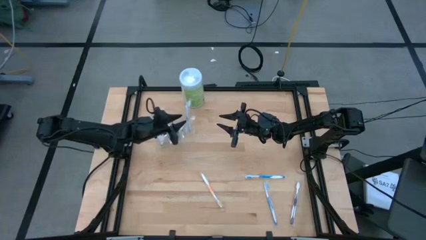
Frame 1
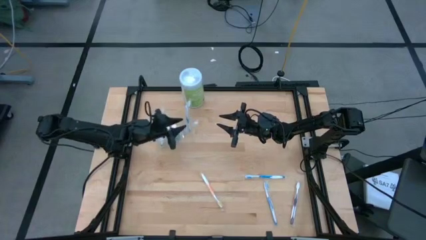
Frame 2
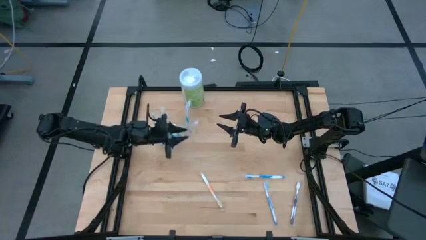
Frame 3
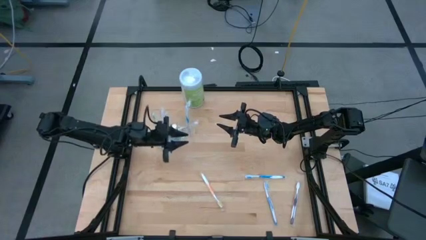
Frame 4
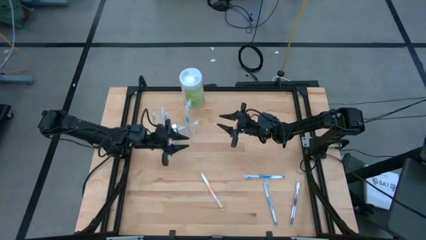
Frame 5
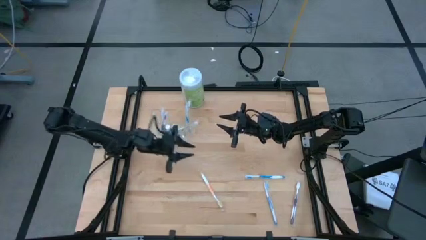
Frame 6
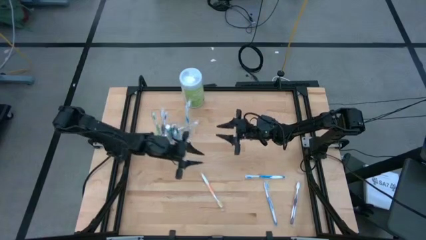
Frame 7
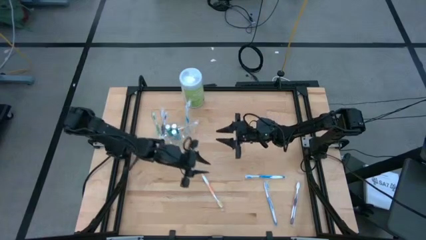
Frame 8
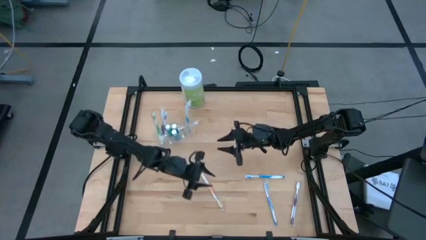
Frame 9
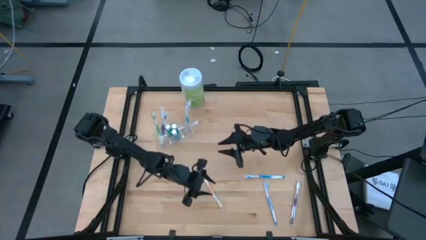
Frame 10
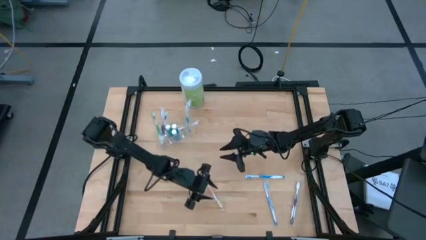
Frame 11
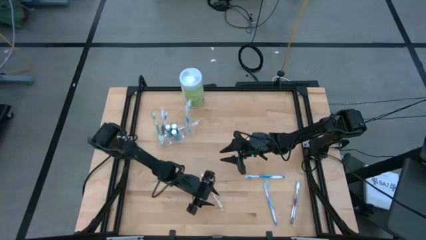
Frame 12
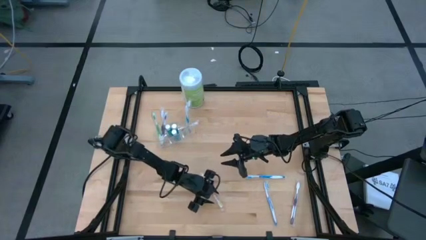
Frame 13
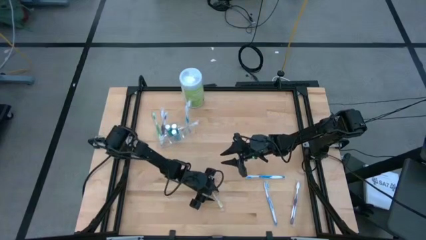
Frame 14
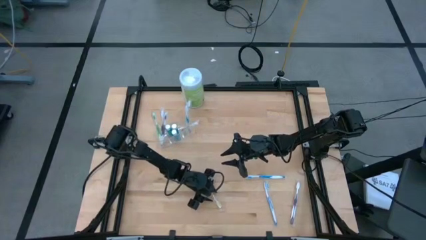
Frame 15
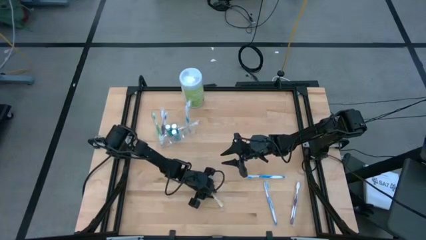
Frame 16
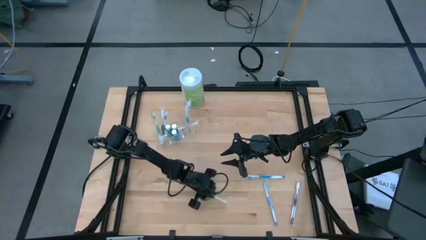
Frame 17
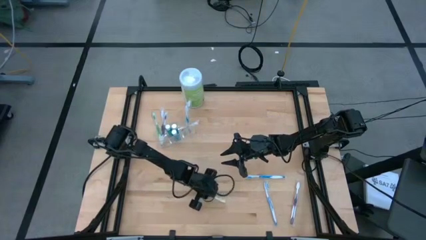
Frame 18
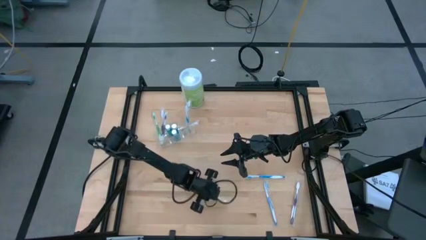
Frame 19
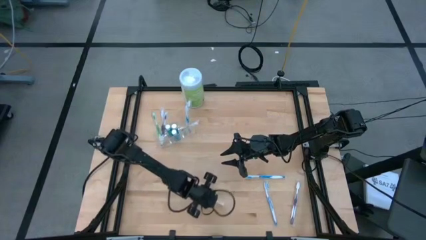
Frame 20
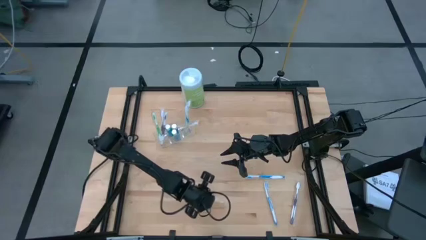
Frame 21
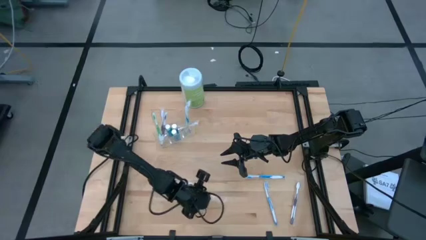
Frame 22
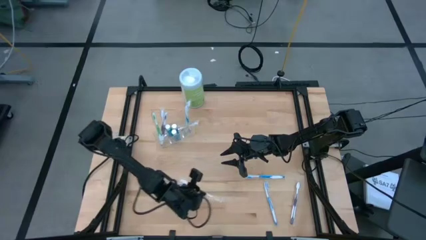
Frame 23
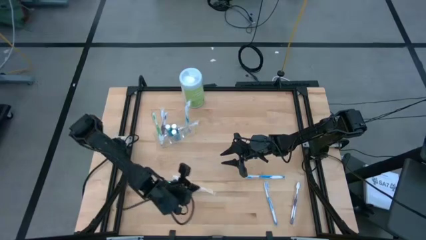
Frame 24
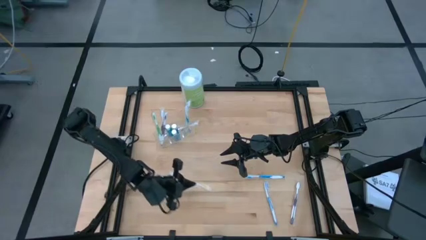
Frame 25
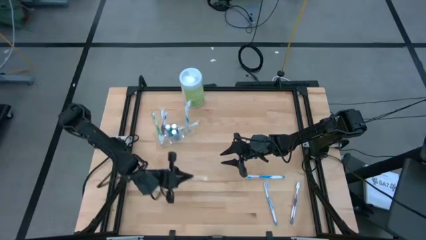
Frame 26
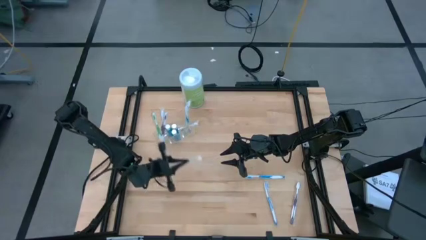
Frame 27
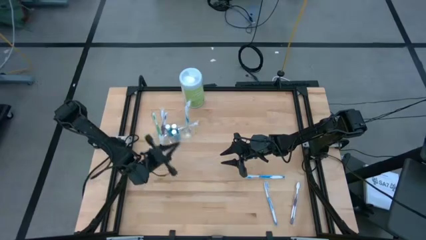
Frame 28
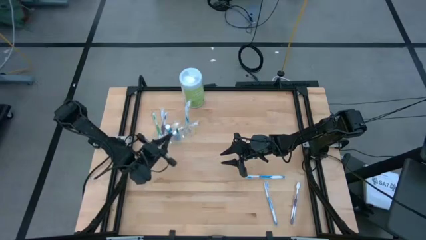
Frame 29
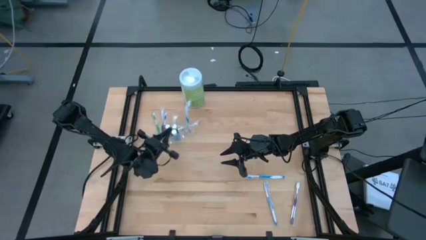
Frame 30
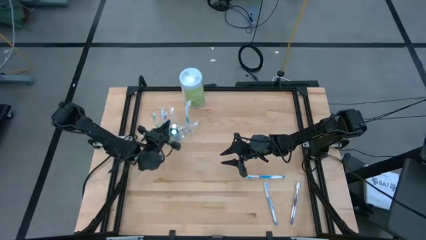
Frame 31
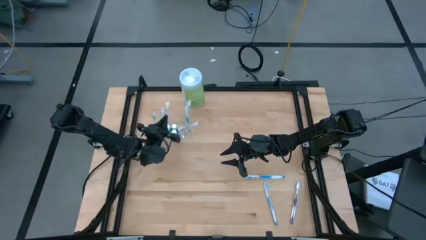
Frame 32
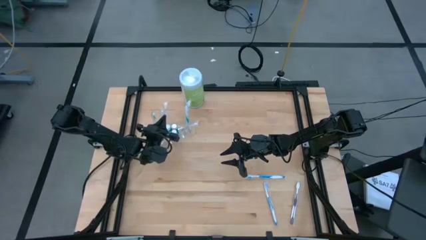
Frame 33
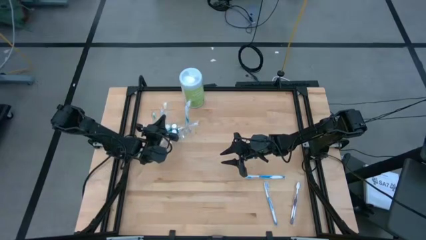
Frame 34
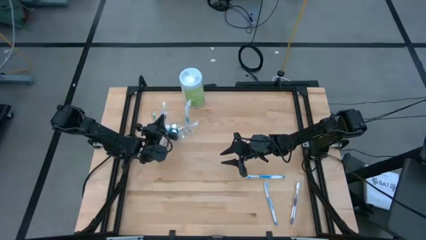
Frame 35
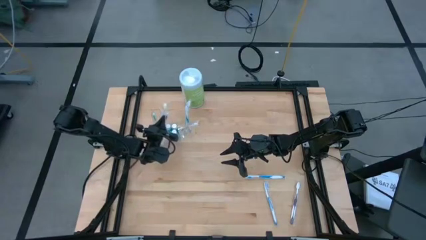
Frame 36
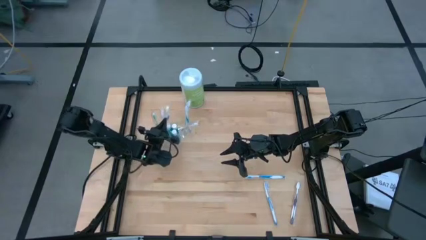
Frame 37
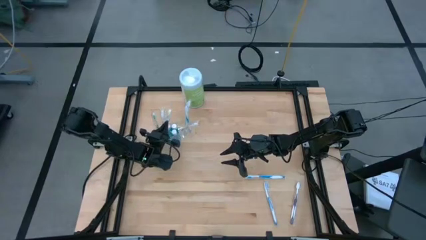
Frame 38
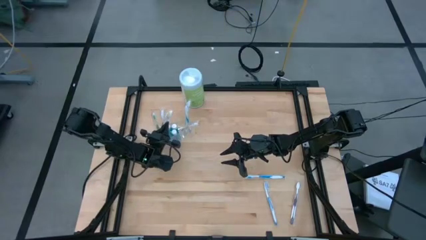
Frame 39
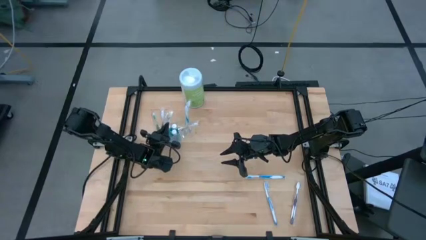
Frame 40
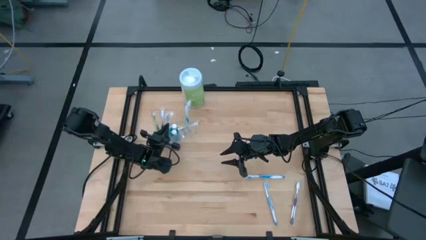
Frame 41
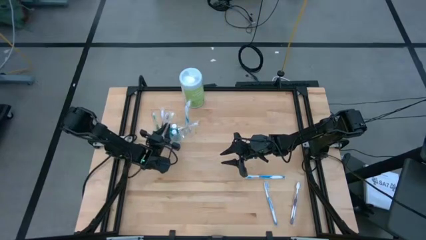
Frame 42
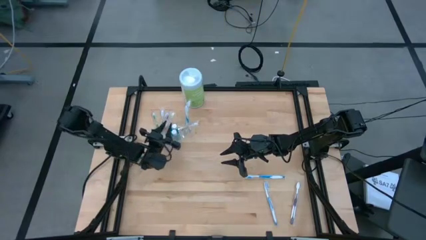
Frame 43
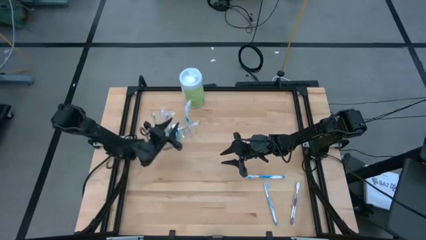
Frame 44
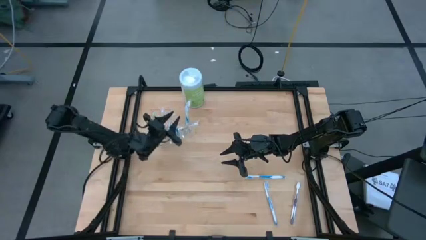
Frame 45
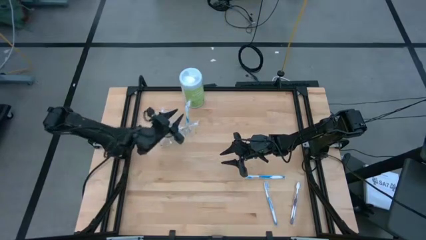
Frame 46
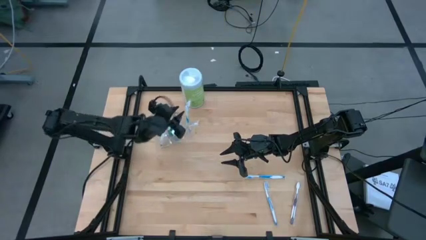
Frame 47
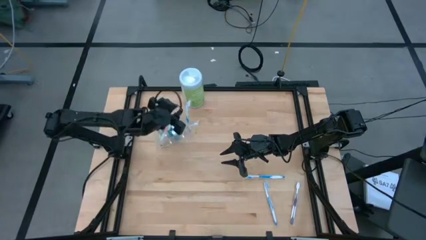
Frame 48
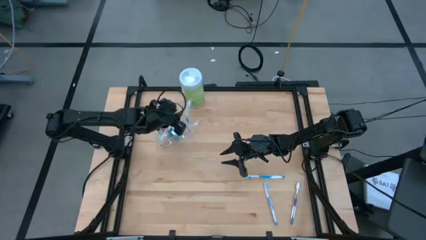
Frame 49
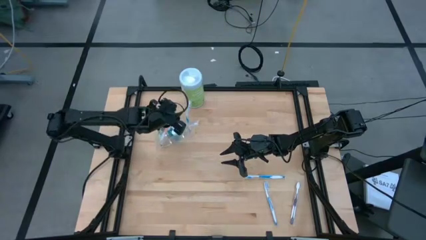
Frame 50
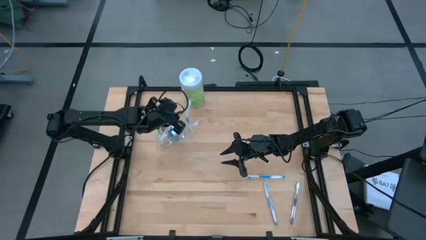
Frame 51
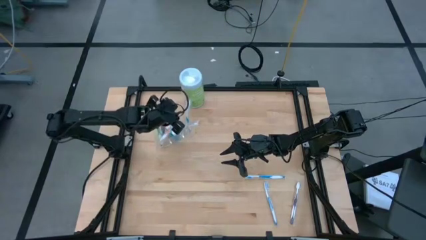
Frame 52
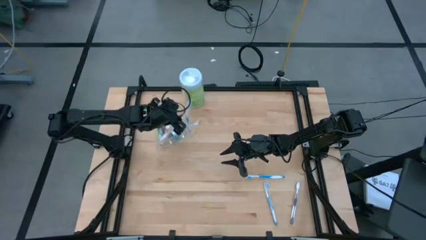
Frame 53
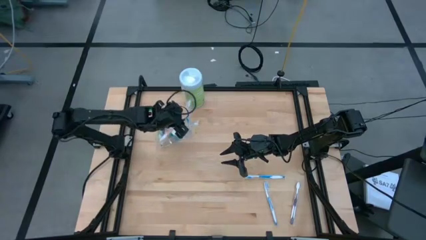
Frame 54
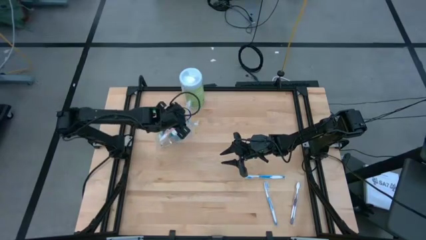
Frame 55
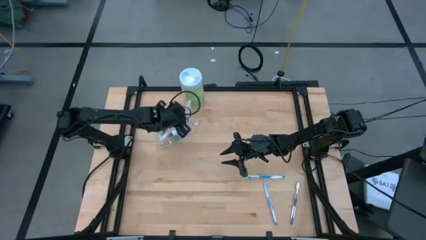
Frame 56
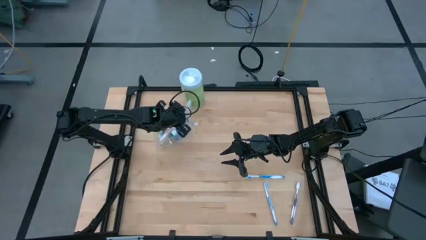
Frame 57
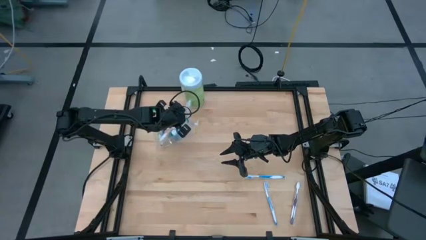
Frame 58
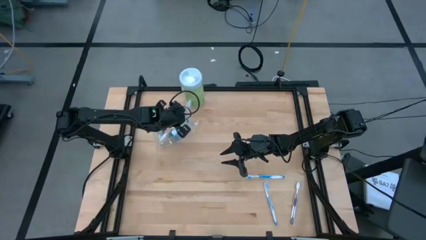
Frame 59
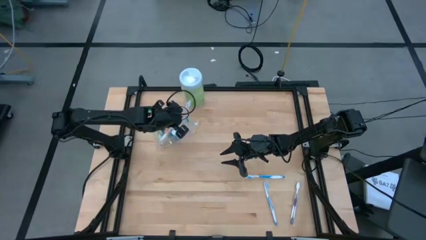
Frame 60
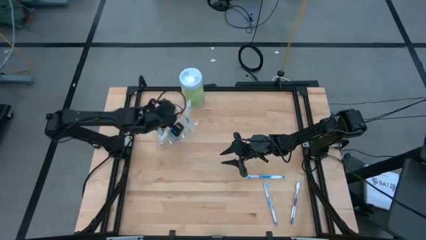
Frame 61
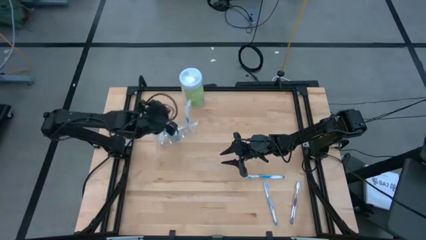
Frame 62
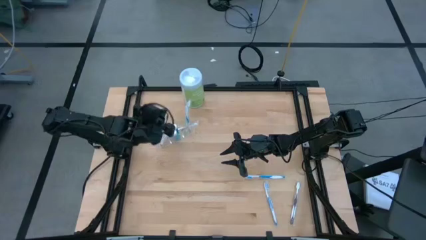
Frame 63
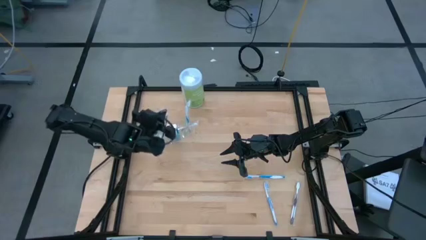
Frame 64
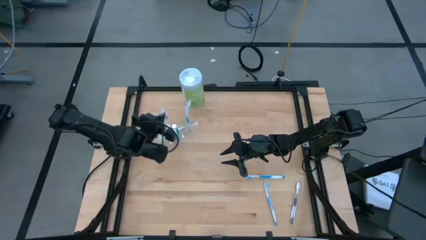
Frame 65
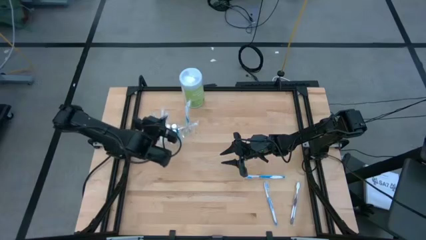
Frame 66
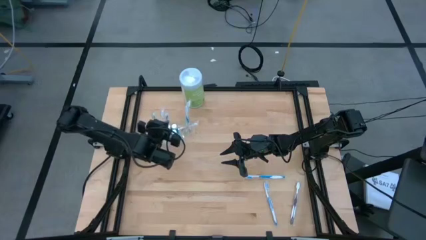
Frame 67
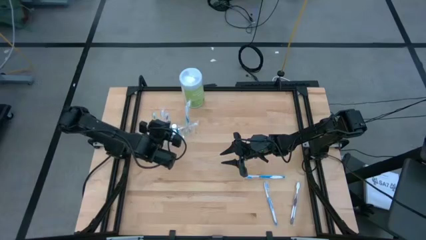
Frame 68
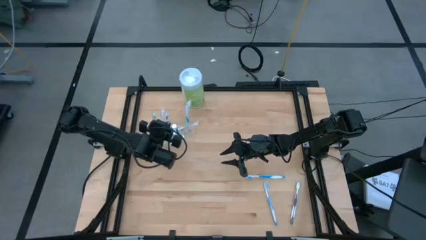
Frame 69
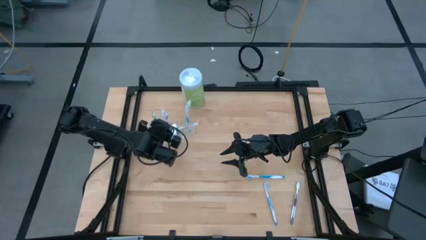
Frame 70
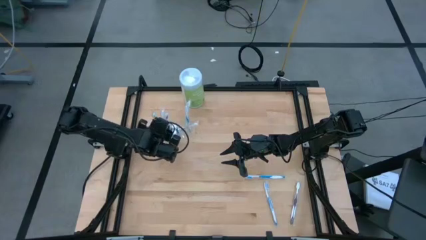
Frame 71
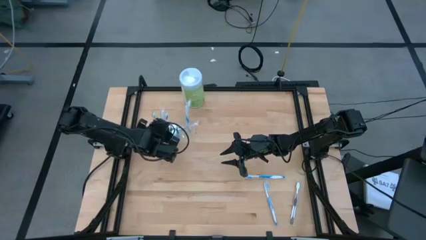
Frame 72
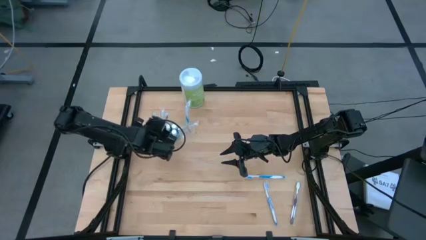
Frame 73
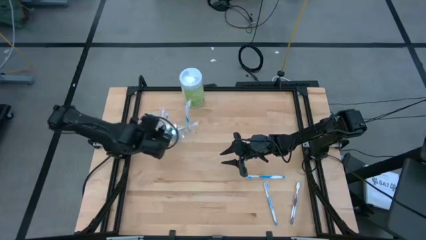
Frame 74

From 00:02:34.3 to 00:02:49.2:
Task: Pick & Place toothbrushing station
Put the orange toothbrush into the transparent organizer

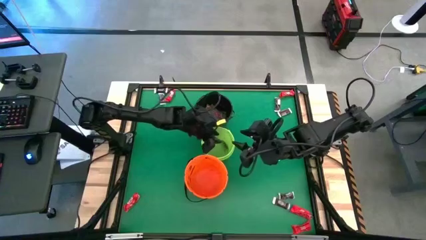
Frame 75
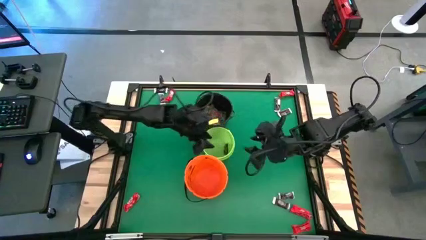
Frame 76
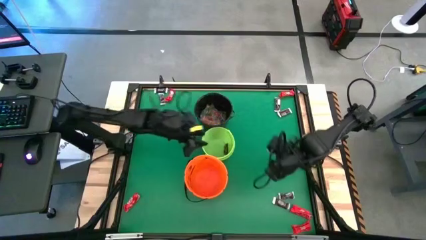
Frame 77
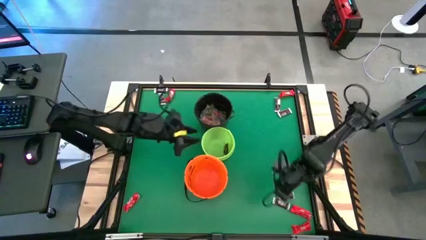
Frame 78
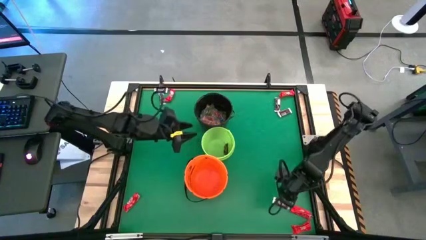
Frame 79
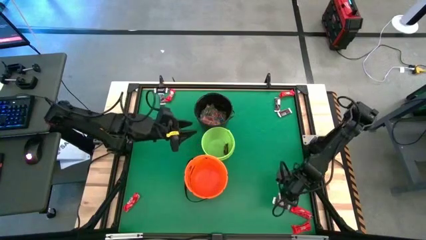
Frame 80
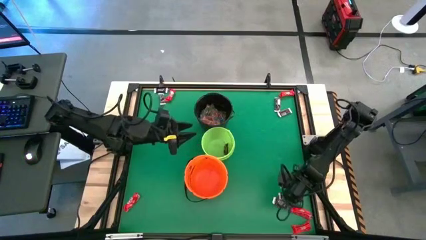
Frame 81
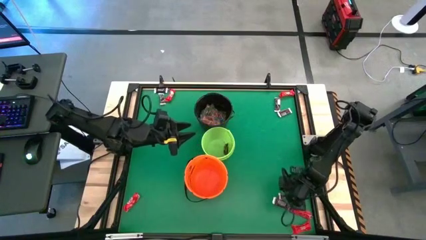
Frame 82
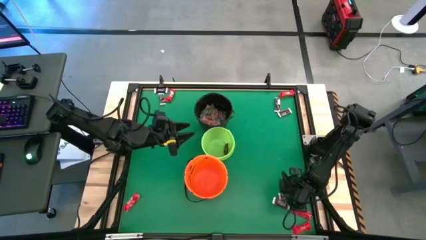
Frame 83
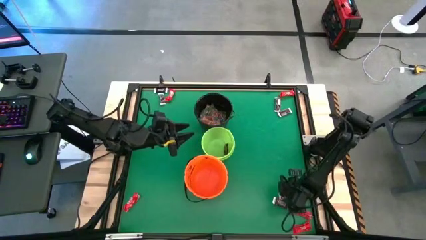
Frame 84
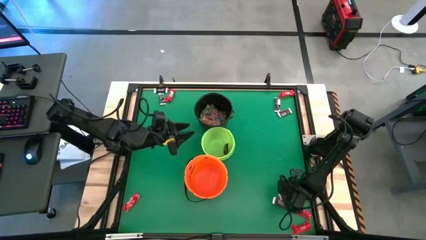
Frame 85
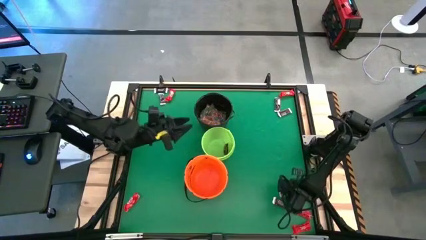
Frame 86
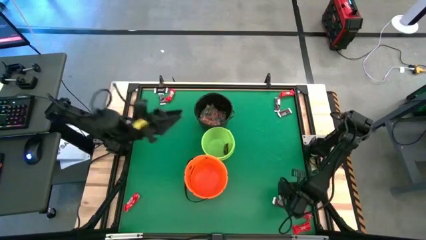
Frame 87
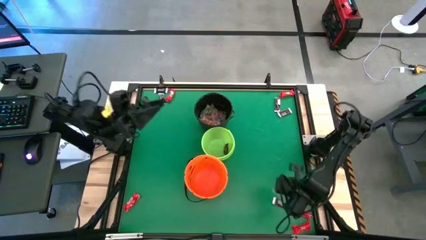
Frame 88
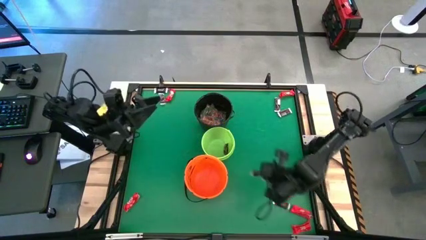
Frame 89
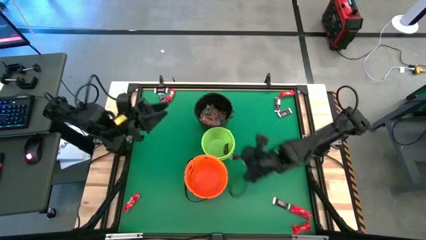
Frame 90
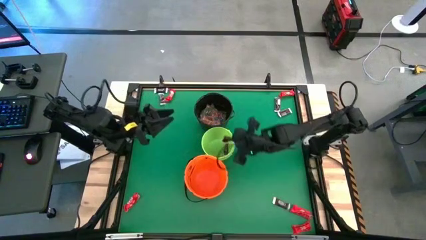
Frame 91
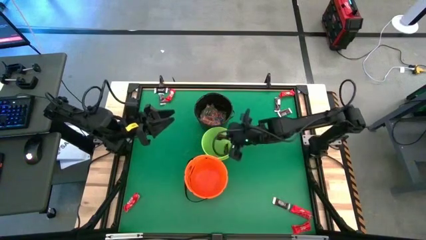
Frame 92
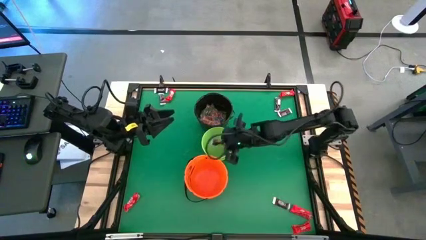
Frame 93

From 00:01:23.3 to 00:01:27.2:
Task: Sort candy by brand, put in halloween buckets
Put the brown chocolate bar into the green bucket
